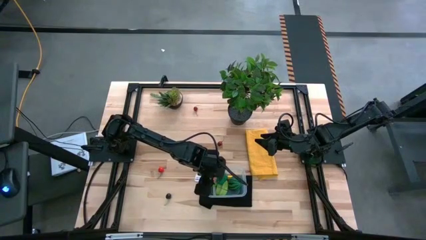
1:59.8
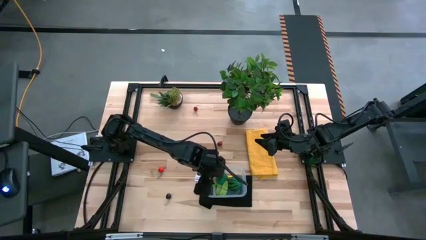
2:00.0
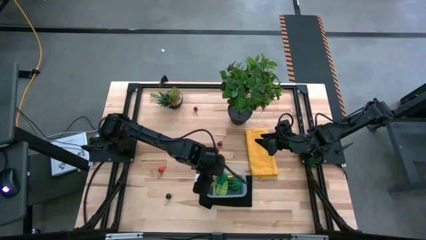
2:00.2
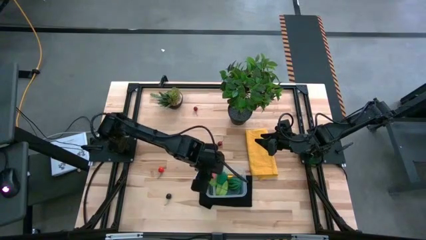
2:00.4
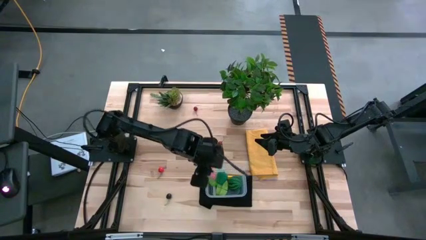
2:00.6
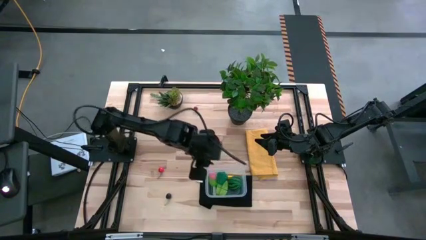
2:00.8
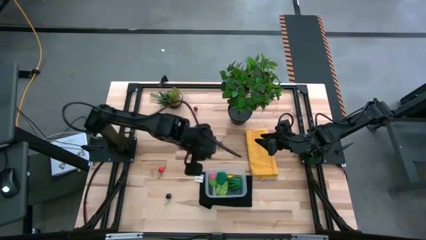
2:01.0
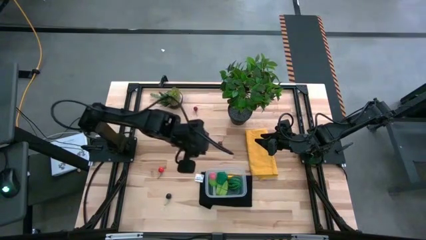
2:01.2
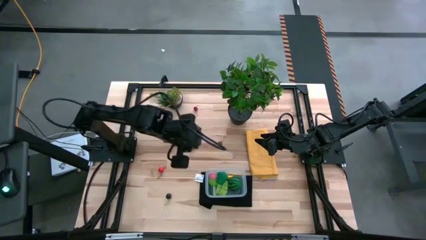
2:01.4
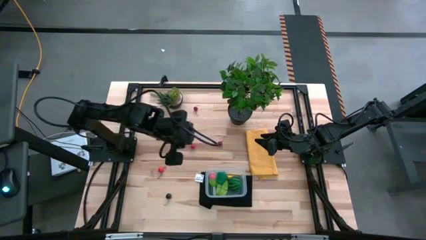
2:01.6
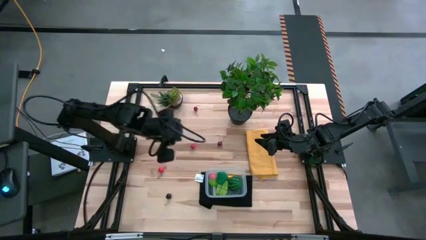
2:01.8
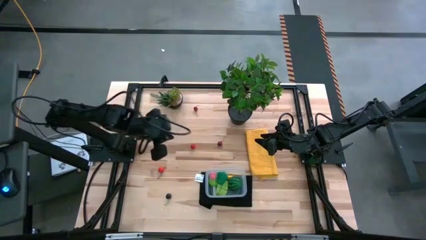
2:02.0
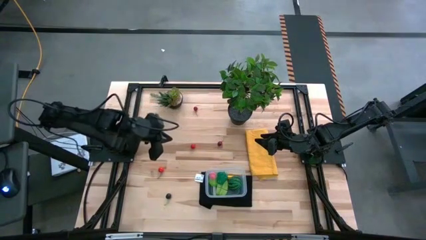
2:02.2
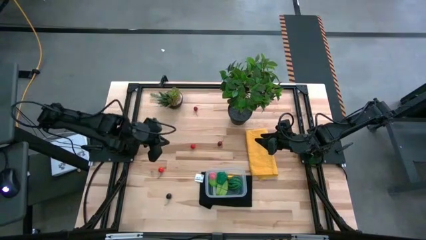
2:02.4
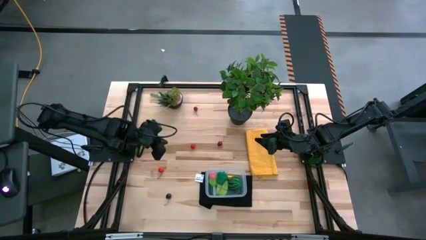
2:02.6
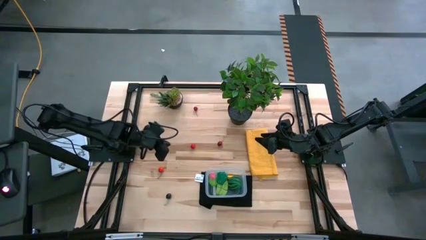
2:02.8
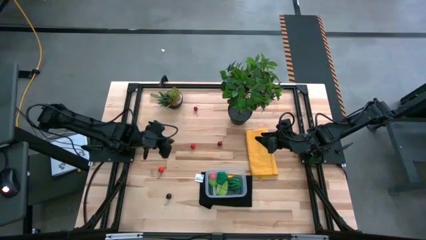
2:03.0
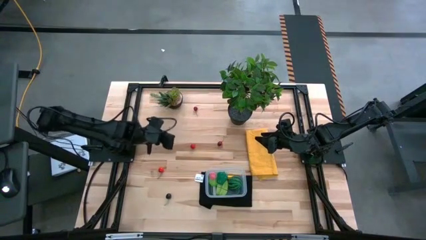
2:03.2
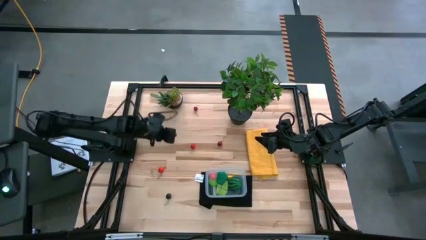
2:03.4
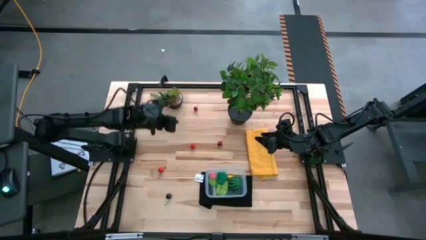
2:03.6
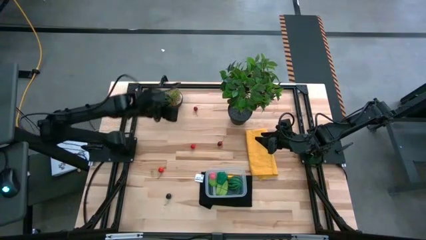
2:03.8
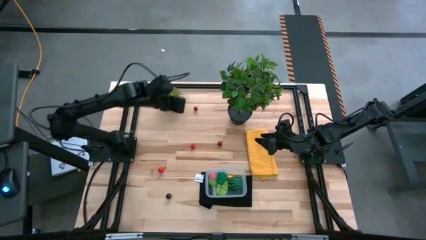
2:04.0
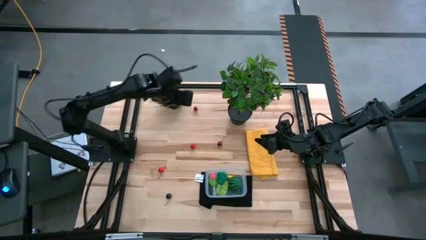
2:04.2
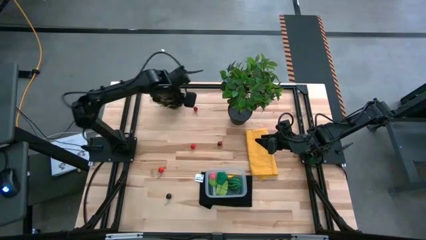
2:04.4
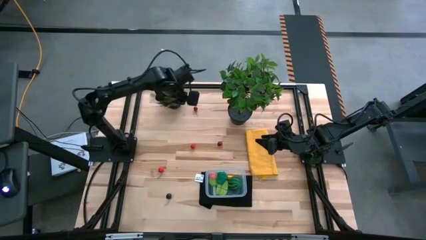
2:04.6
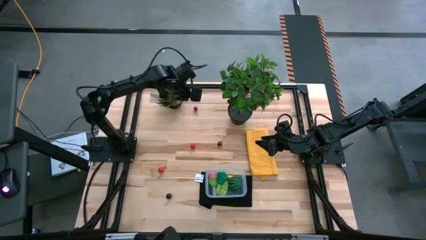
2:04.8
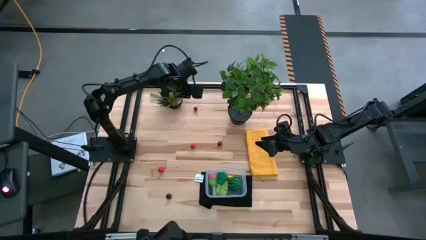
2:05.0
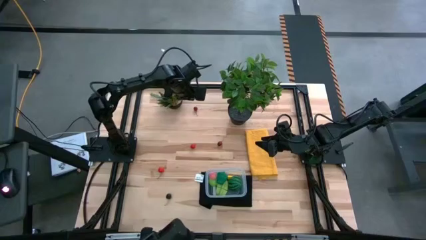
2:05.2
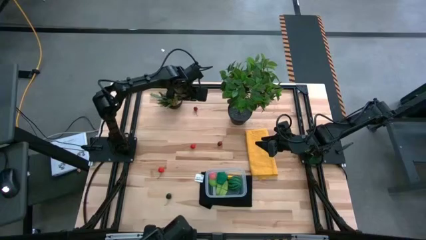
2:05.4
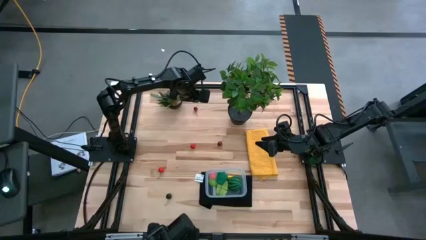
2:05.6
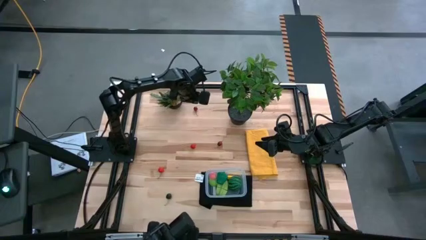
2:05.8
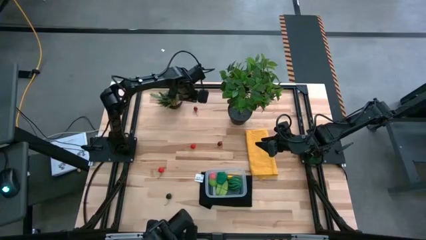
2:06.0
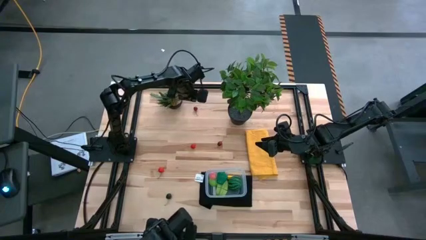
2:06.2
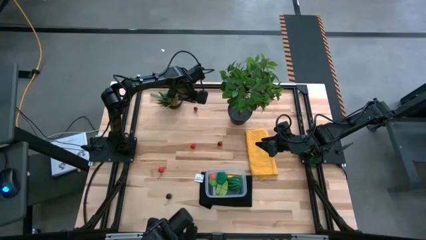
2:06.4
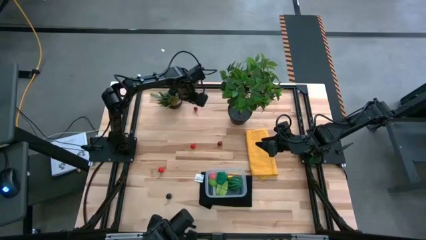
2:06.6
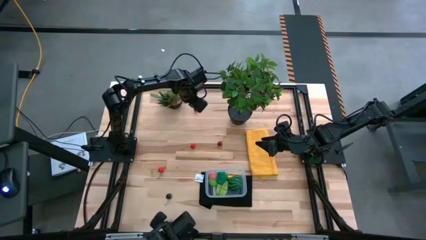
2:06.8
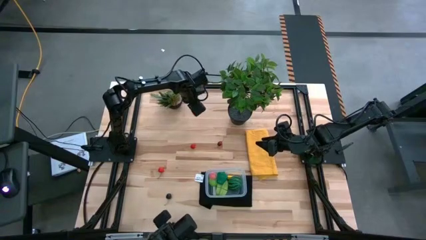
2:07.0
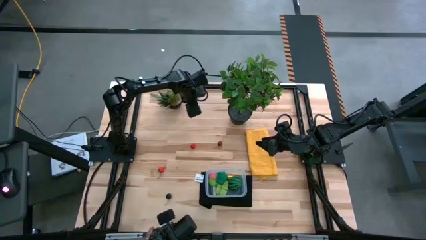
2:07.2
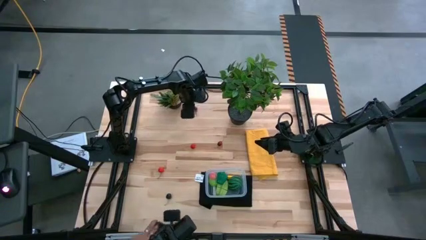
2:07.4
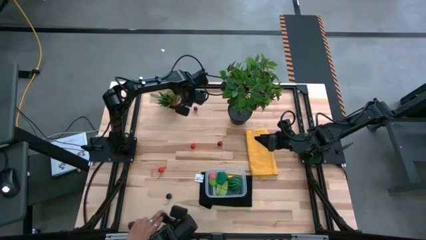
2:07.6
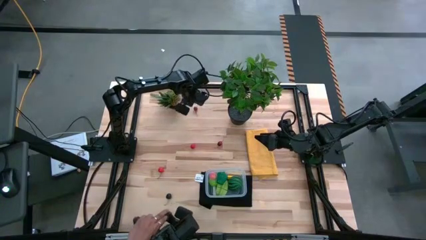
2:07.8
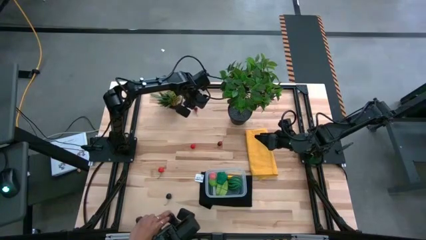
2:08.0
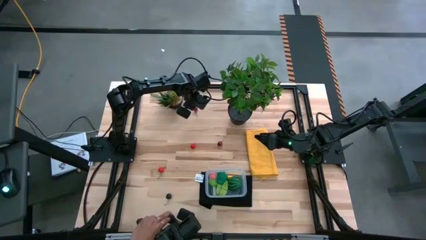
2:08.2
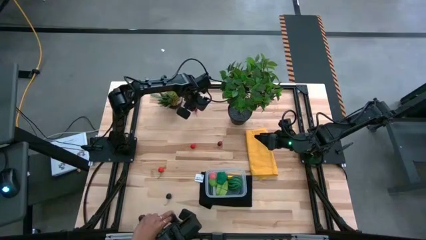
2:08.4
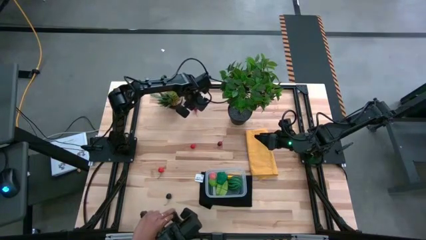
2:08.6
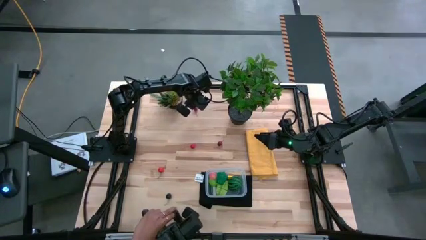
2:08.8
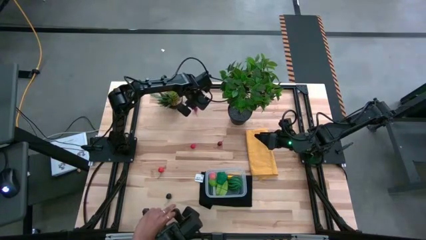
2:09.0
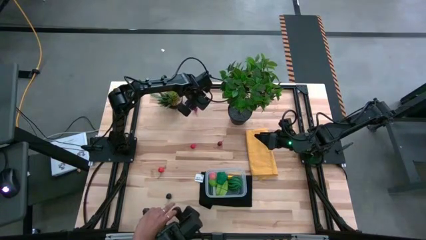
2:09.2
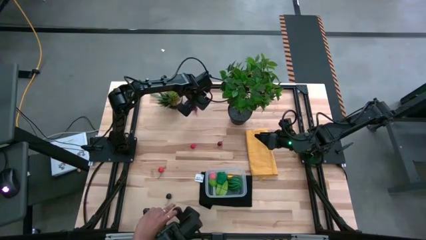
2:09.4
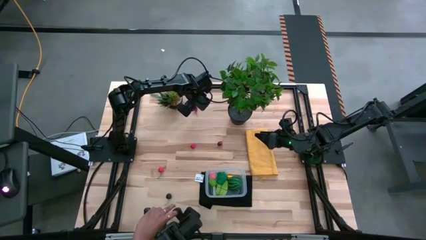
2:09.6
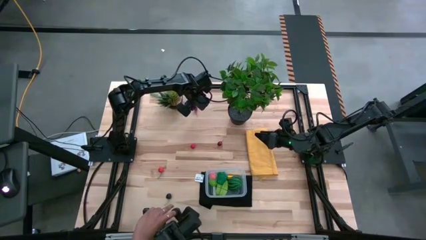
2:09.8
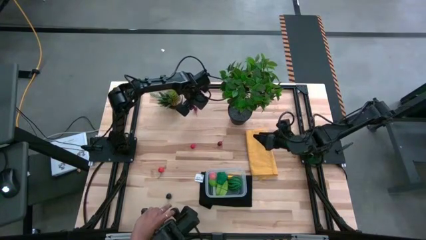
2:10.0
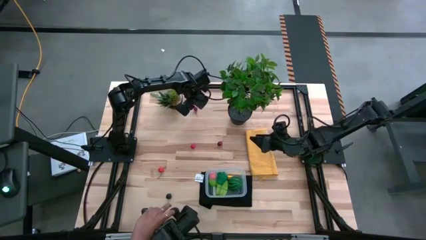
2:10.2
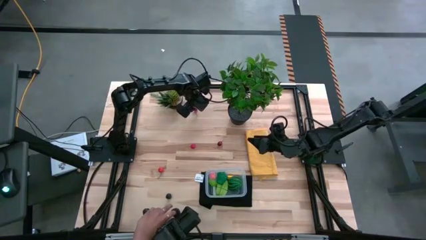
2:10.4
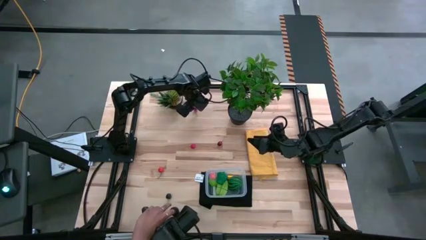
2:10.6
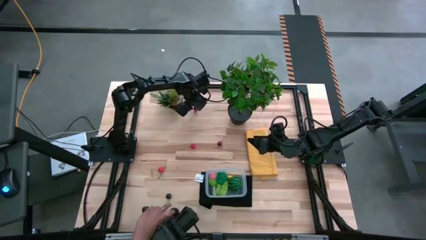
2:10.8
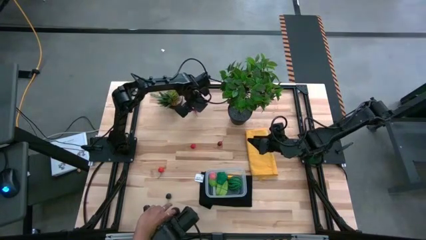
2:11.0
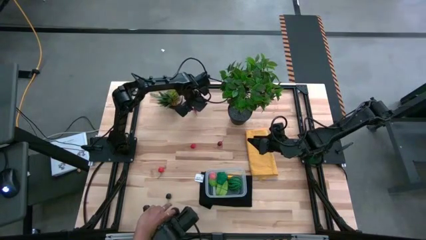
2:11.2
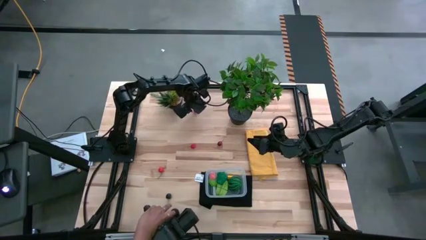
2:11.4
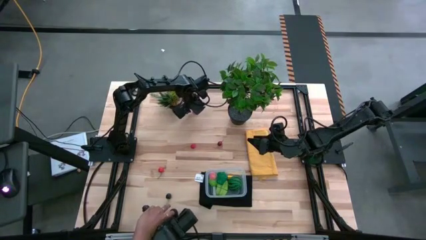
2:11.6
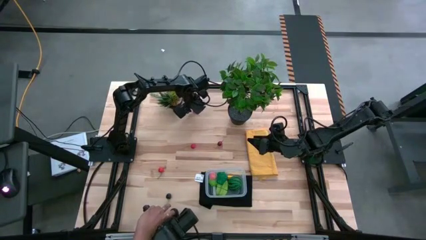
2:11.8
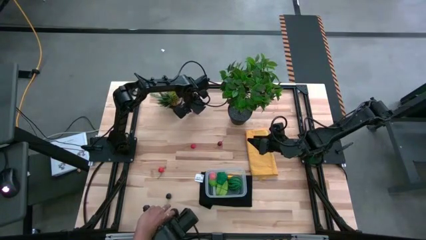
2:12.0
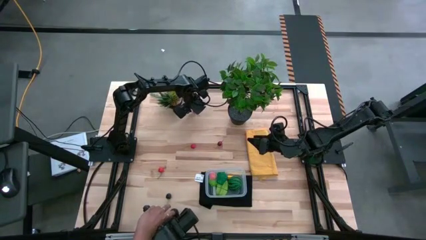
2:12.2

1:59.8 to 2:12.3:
Task: Pick and placing Produce into tupperware
Put the top red cherry into the transparent bin

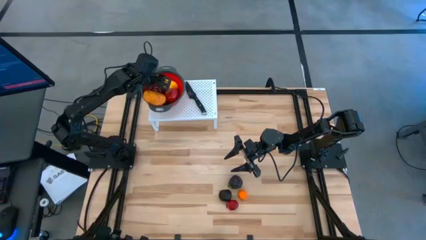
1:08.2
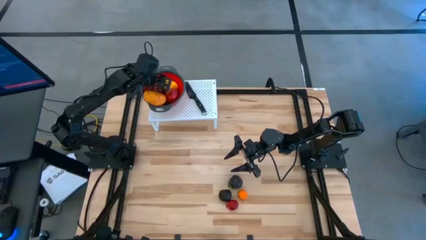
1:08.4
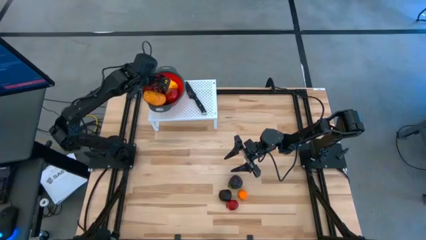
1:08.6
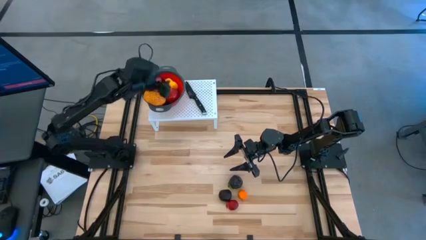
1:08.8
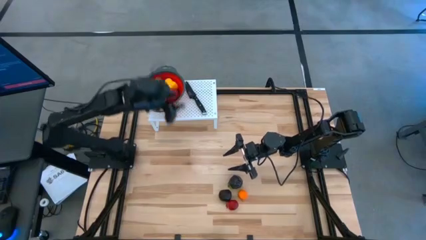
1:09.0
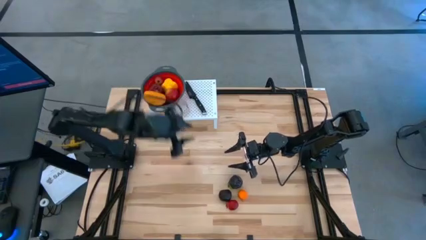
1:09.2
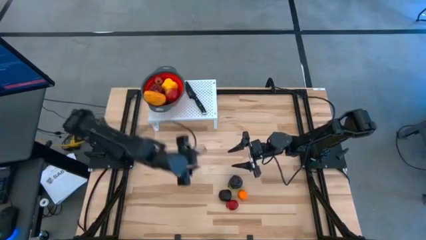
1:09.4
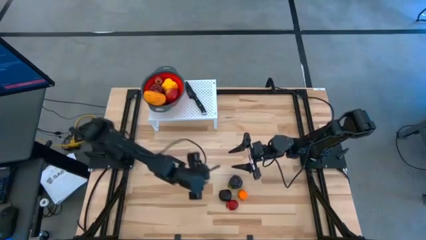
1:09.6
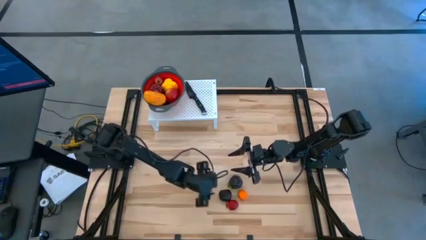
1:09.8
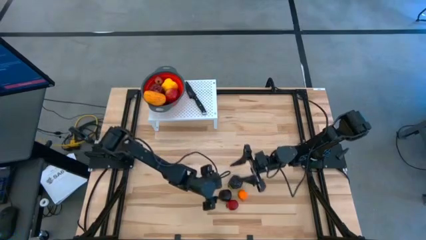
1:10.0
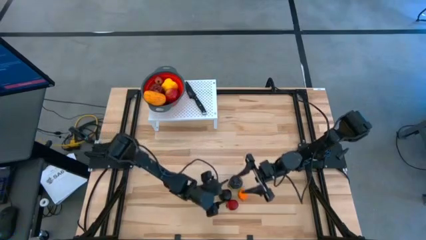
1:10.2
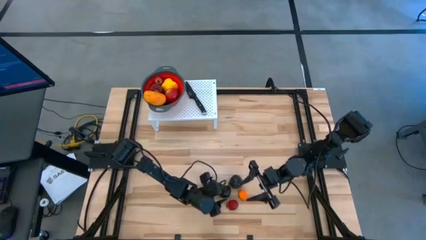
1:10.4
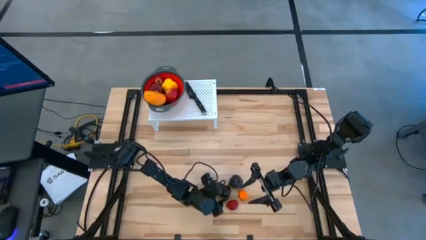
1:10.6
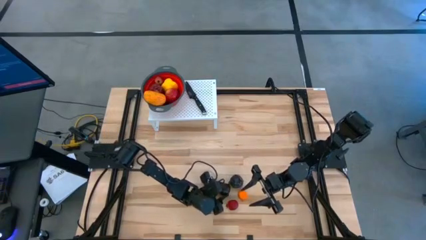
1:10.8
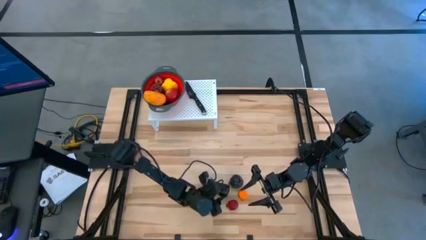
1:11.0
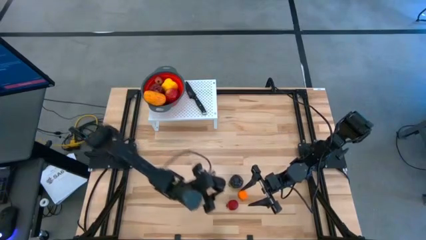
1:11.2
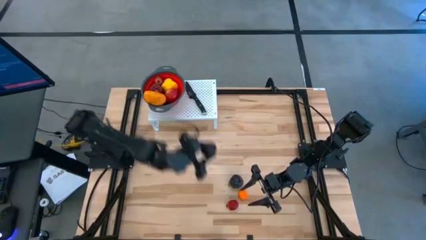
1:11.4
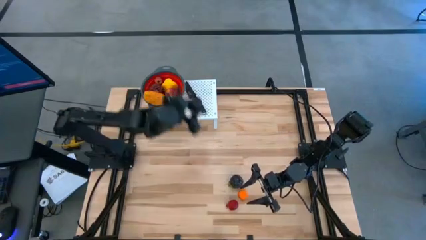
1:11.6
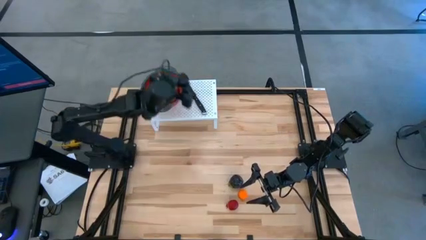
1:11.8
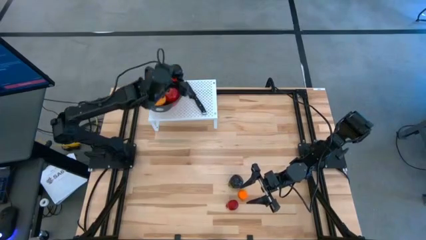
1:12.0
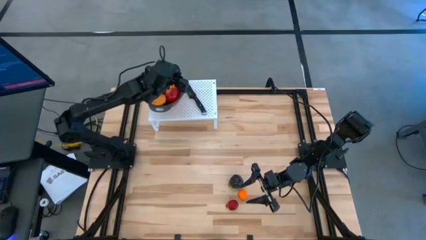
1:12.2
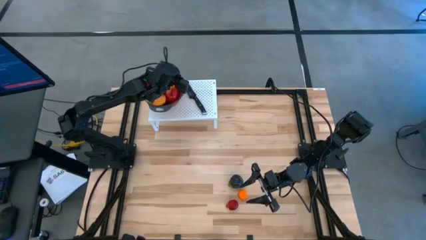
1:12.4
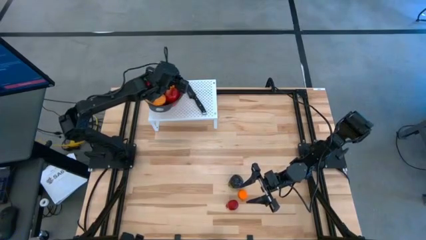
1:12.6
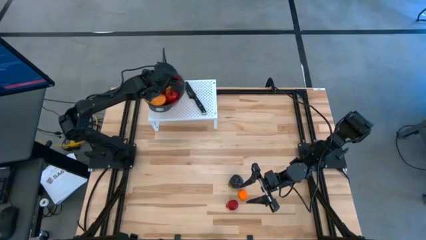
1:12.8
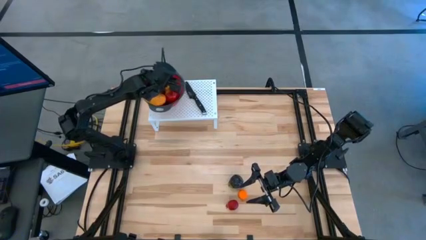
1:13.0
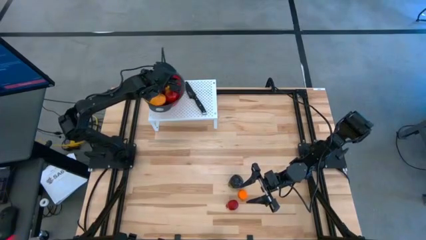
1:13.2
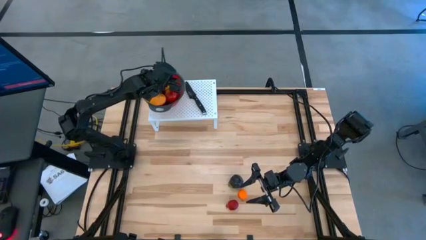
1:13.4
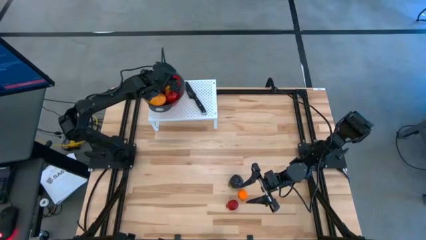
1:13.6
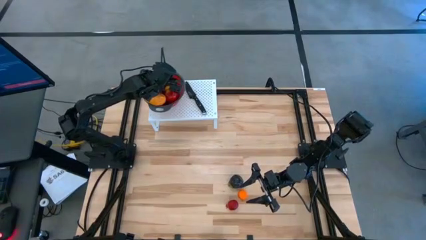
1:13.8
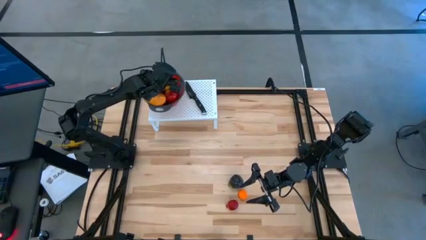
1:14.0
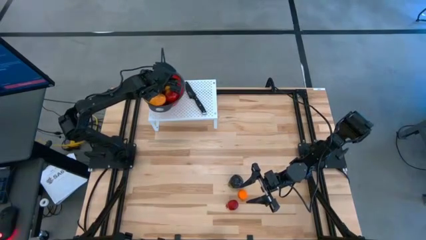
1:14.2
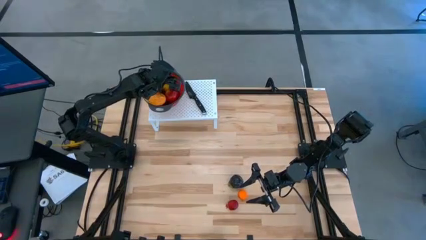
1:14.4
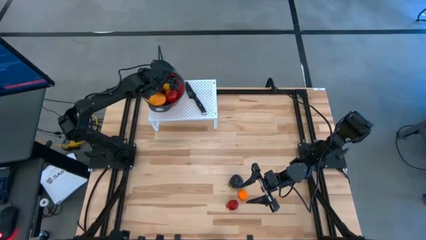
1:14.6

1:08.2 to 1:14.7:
Task: Pick & Place Fruit
Put the purple plum into the red strainer bowl on the shelf
